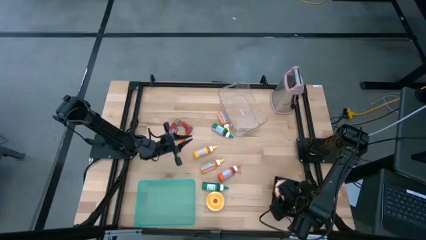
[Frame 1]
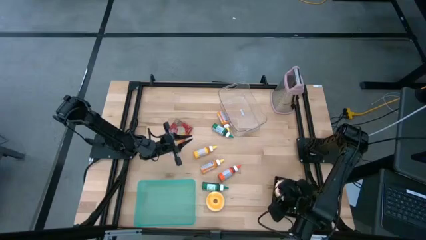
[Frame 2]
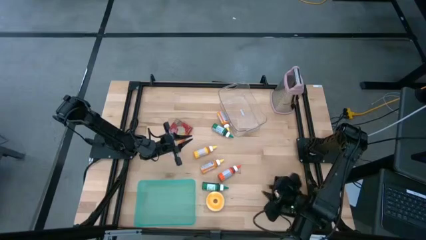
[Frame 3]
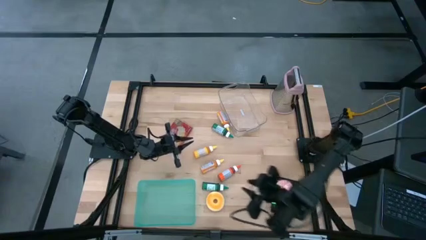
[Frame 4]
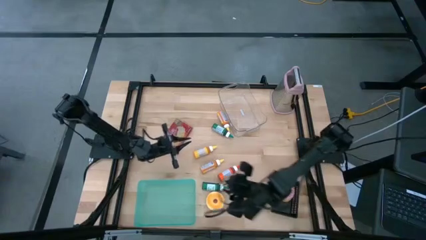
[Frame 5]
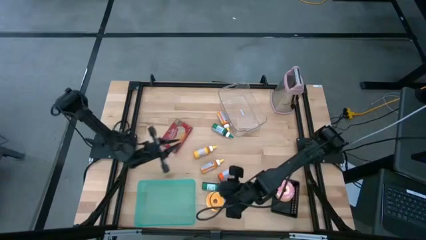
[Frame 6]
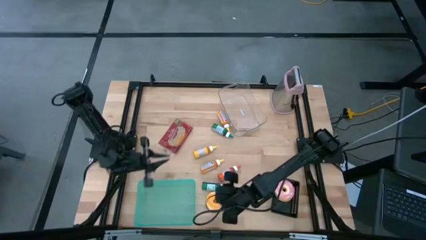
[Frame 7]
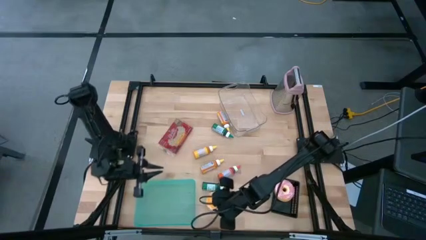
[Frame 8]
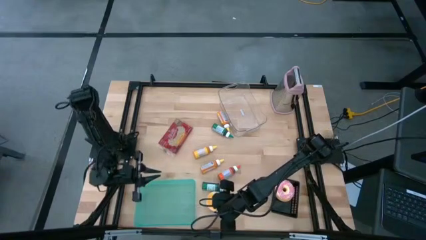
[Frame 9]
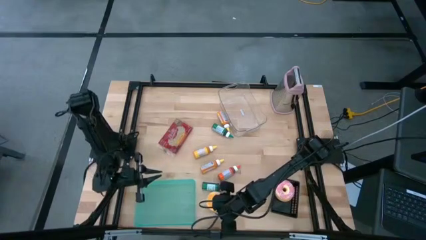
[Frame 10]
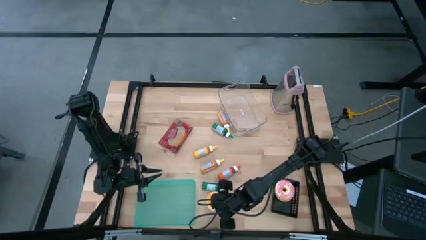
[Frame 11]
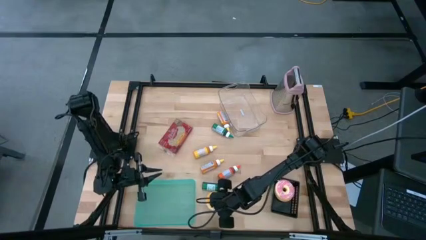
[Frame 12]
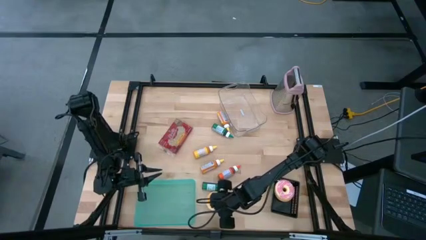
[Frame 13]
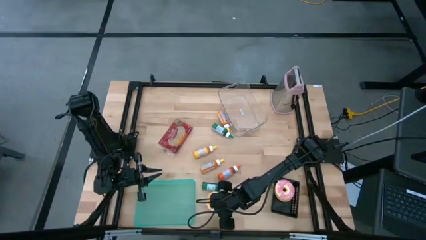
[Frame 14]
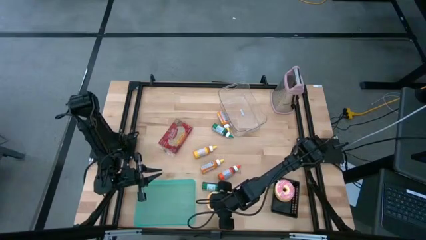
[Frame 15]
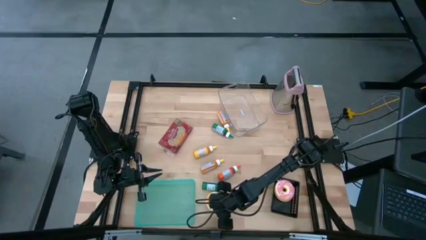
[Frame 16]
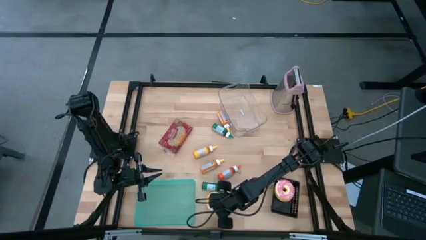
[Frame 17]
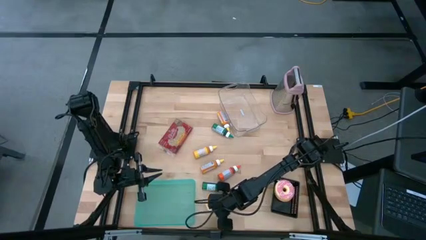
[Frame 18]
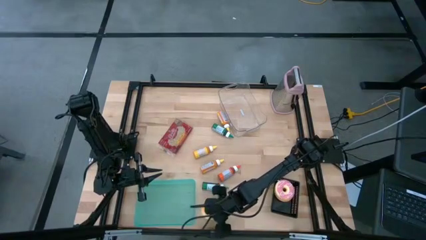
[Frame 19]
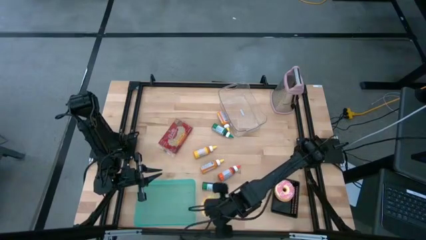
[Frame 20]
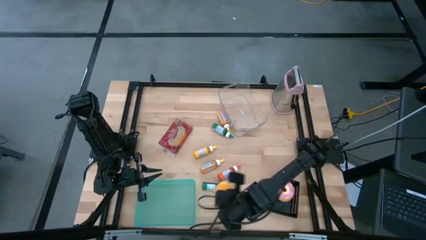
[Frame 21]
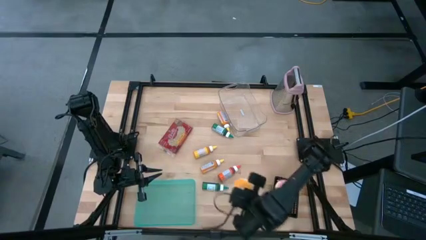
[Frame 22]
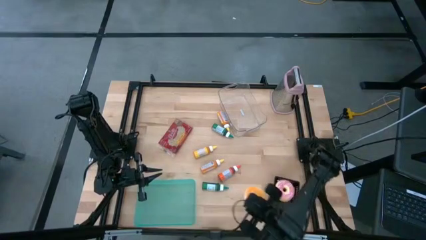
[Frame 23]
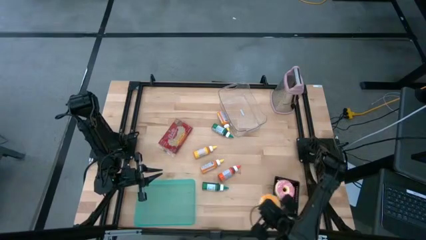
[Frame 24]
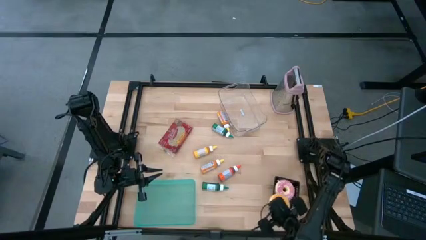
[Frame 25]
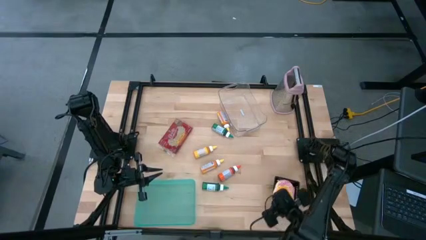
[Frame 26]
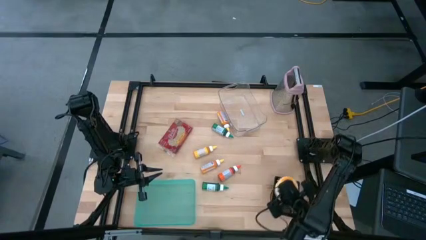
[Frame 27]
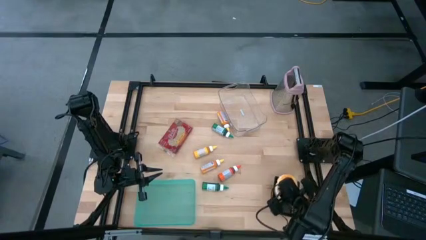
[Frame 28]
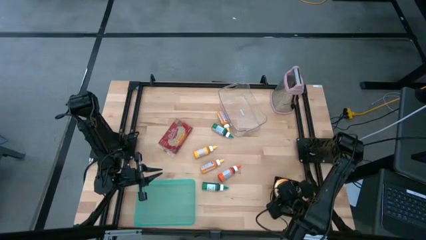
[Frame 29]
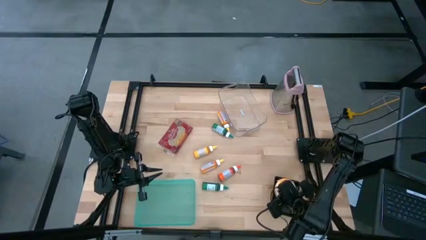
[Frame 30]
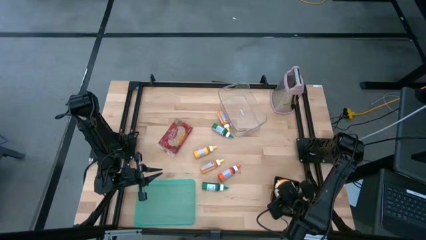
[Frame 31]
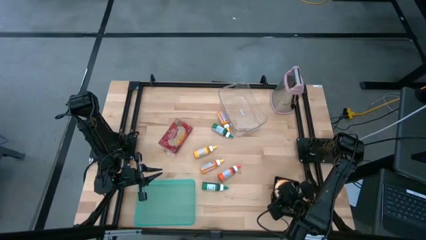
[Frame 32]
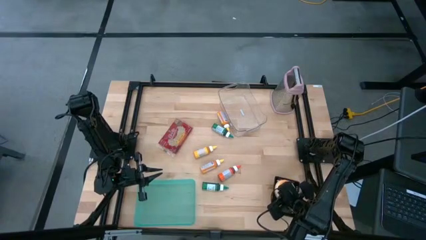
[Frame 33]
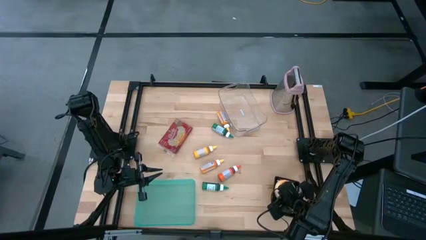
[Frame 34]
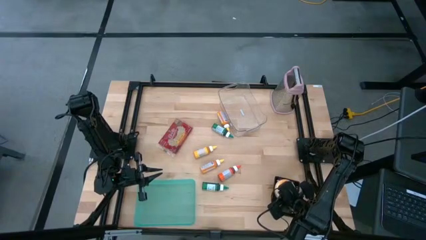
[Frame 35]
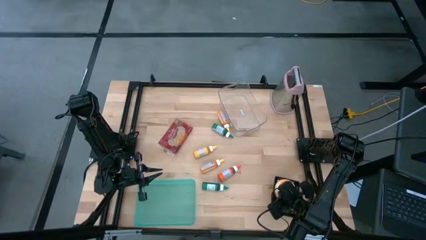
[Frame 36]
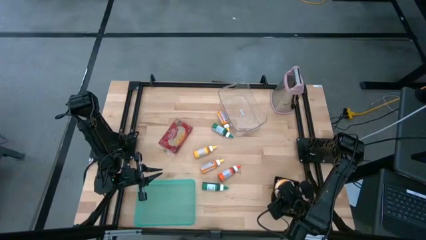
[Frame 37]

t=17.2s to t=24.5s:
Task: Pick & Place Food Item
Stack the yellow donut on top of the pink donut in the black basket

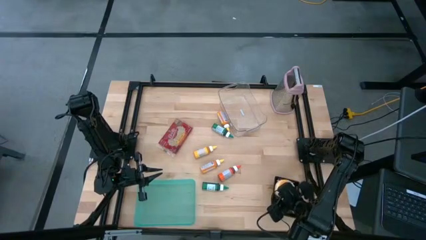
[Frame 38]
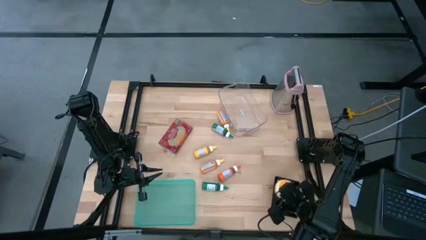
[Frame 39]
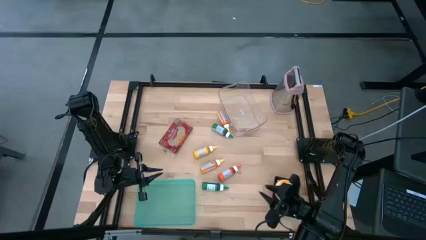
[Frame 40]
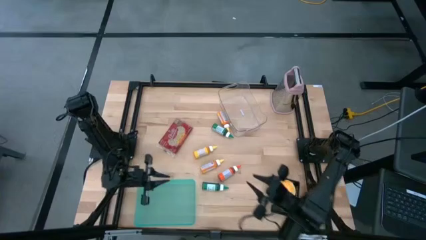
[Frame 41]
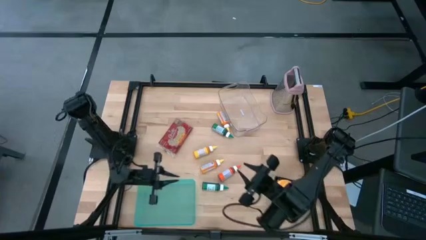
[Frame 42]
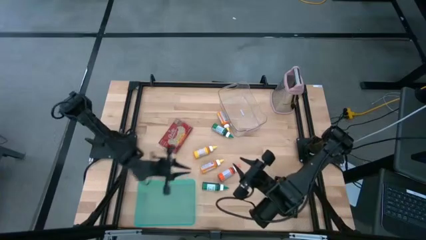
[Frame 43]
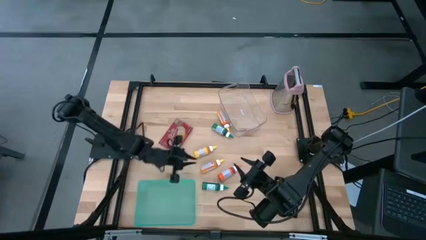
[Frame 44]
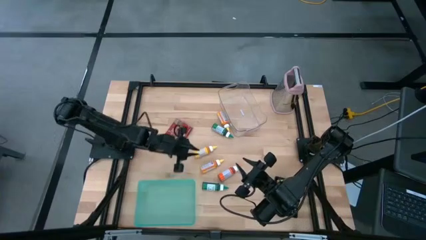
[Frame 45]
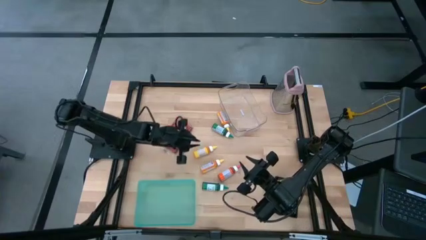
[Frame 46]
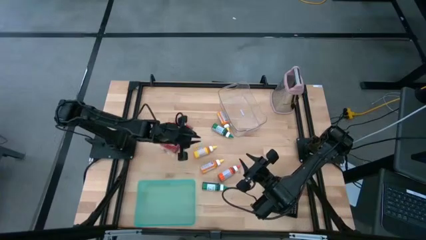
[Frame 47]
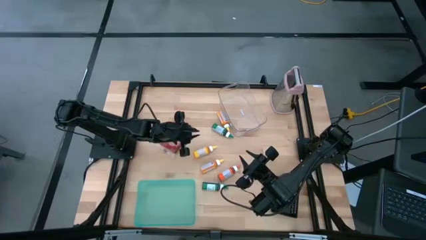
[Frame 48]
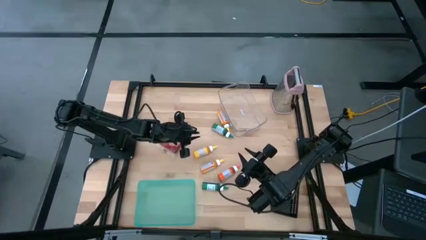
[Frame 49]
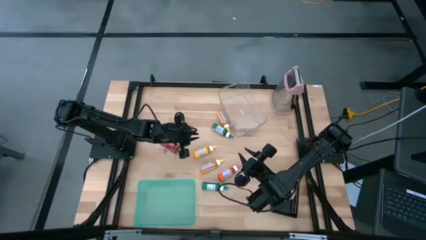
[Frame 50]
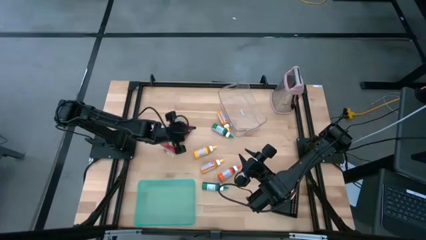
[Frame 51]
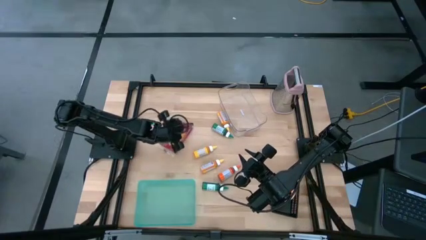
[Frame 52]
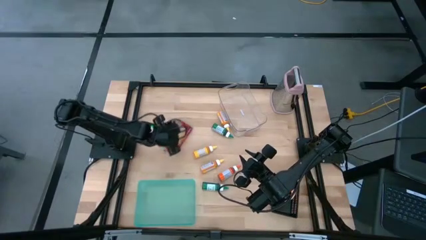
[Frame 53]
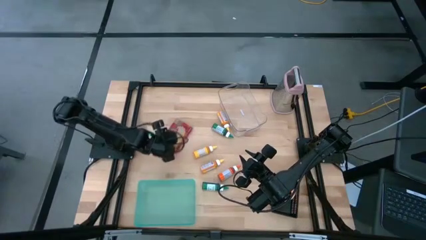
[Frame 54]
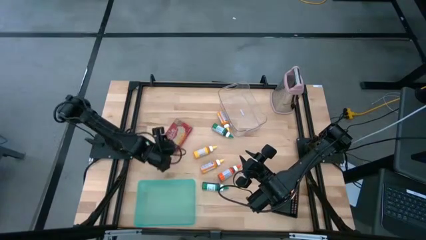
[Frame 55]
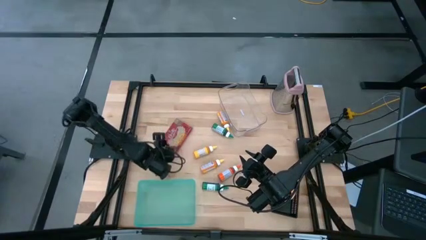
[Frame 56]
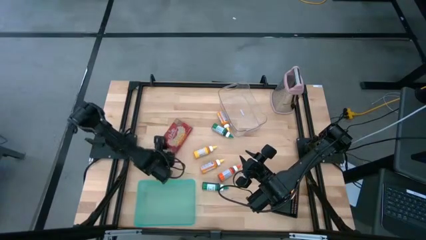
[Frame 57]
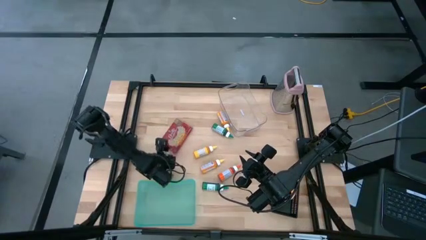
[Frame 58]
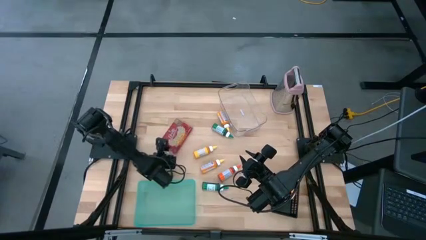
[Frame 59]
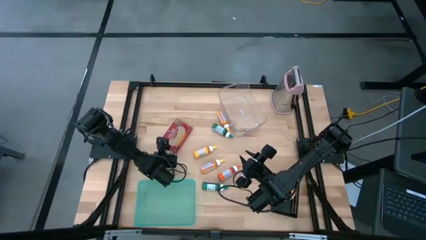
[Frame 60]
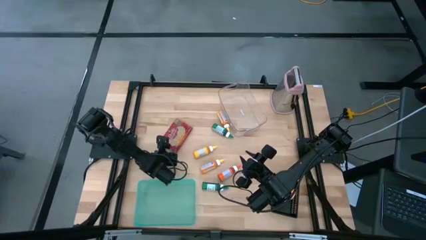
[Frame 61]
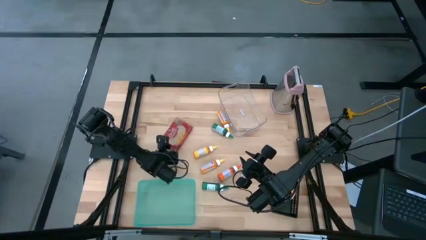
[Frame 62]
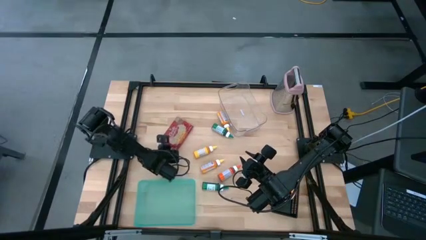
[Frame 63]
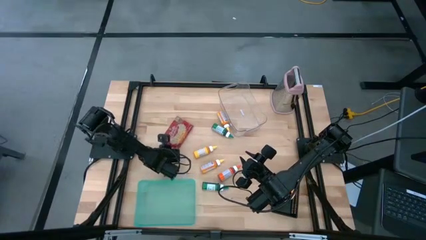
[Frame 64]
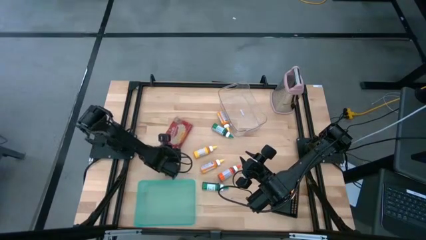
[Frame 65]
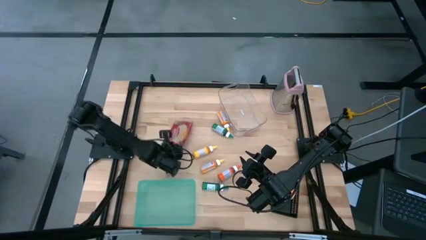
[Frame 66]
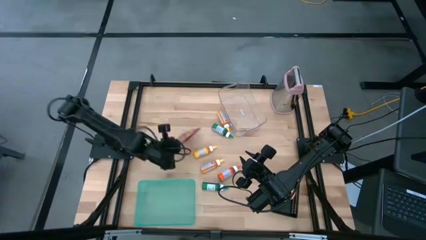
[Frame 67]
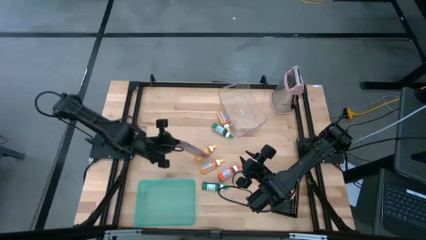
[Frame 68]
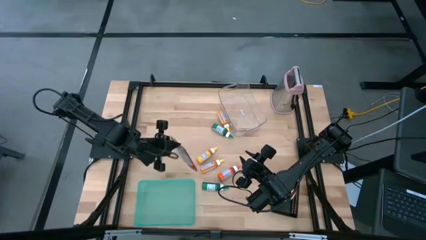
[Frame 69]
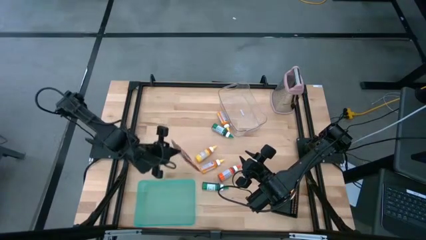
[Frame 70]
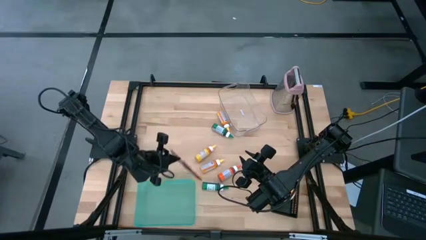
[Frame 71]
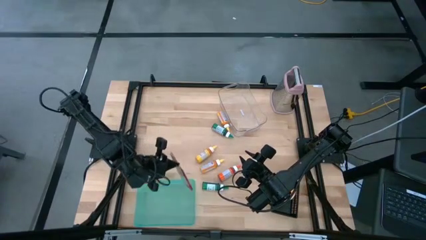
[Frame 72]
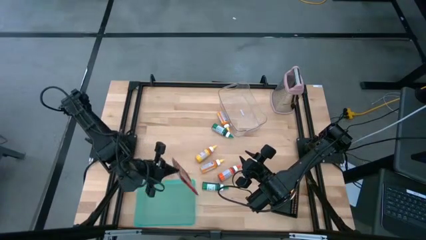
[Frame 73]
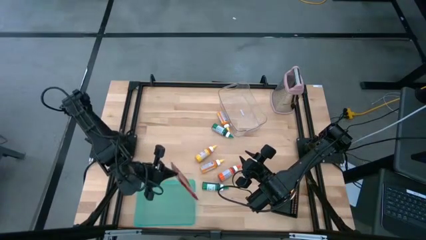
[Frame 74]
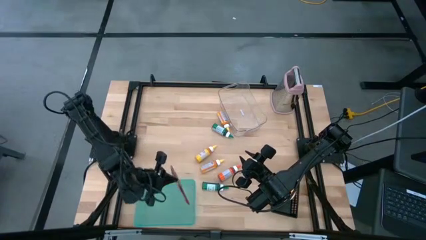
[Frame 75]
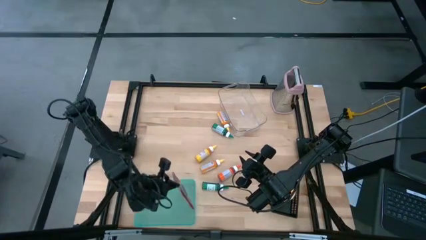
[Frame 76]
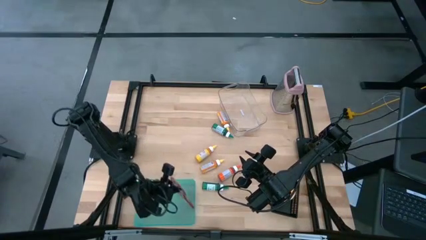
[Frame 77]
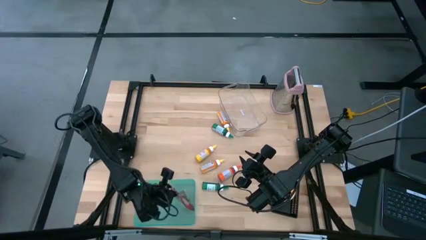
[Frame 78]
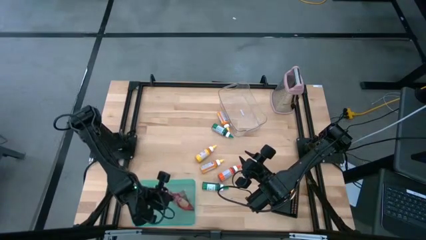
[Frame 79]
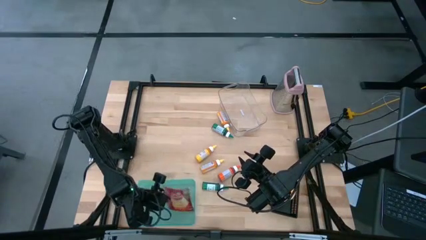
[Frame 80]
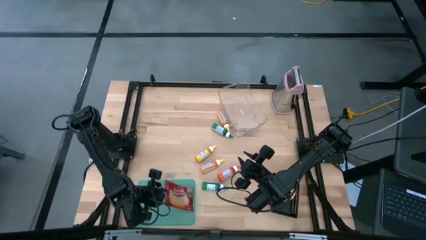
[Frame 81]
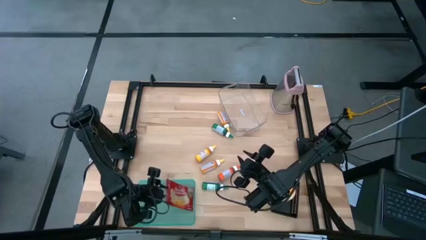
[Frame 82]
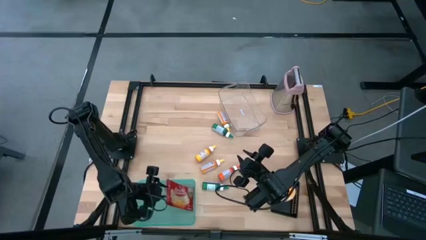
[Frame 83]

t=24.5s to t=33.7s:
Put the red popcorn pack into the blue bin

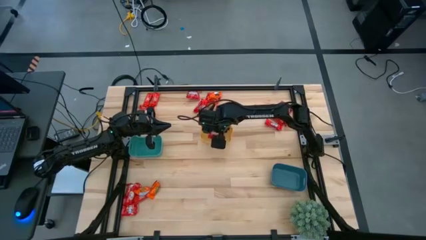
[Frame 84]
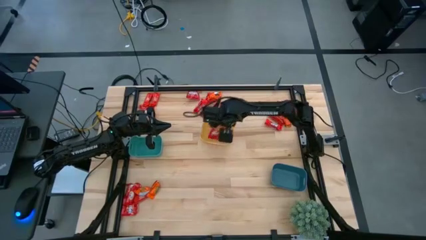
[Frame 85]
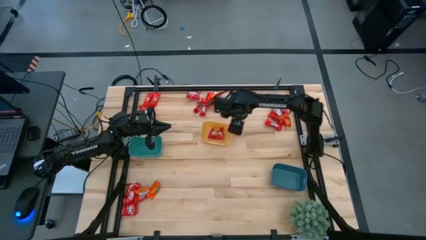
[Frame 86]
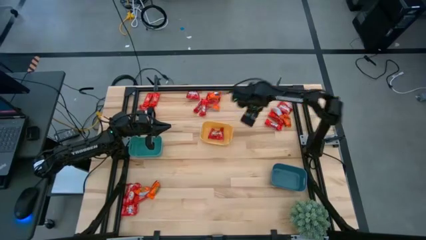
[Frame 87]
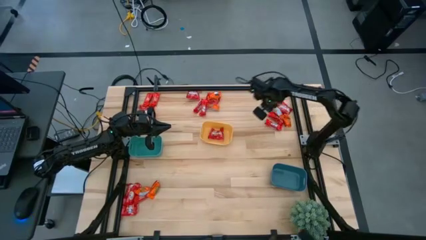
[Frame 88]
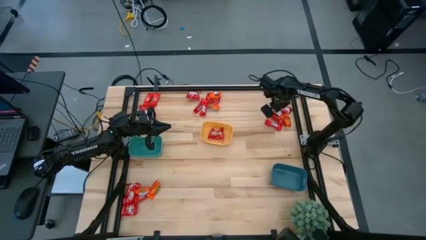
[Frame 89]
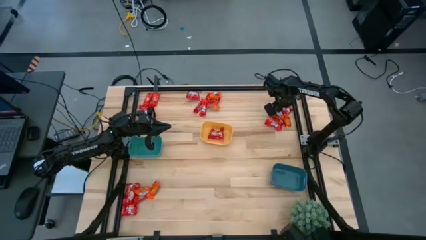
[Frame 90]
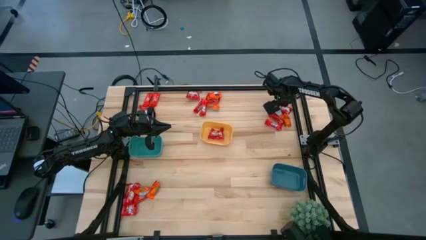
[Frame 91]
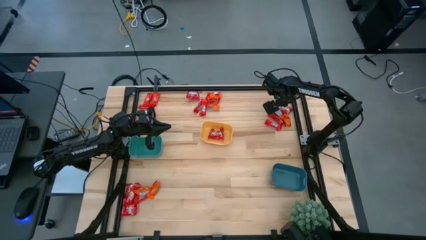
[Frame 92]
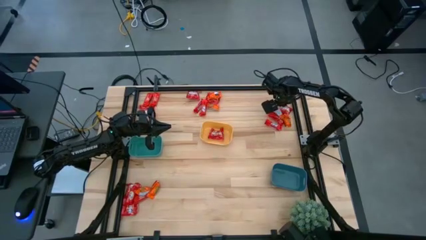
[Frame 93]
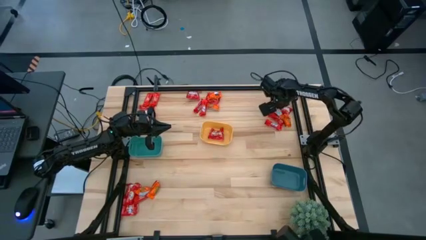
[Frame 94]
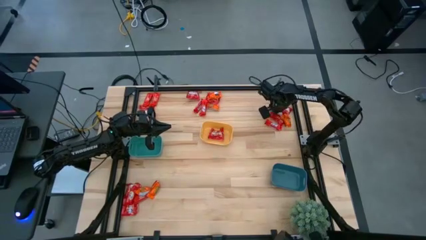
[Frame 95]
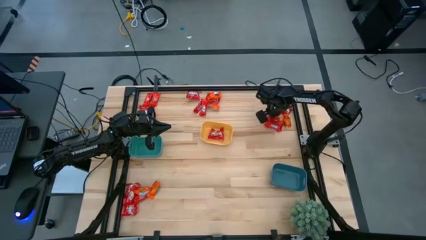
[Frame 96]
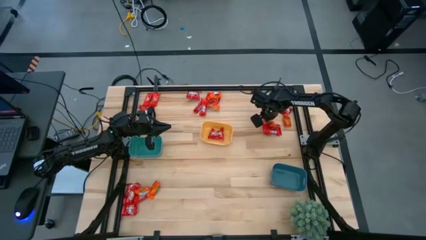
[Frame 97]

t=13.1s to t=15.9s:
Task: Sort candy
Move the orange candy on the table
